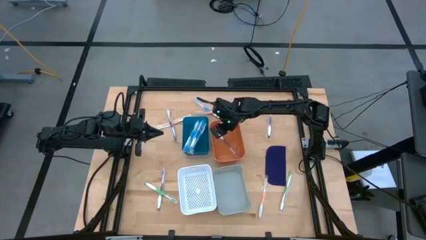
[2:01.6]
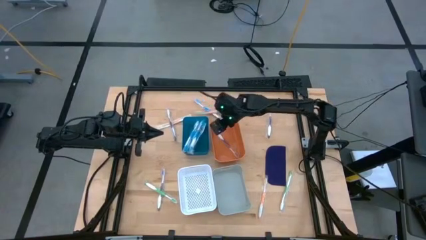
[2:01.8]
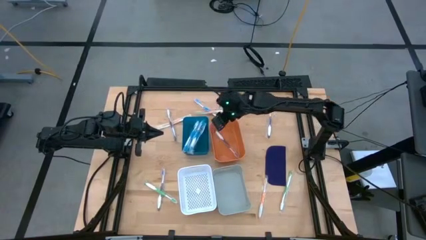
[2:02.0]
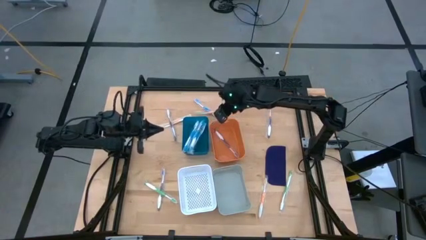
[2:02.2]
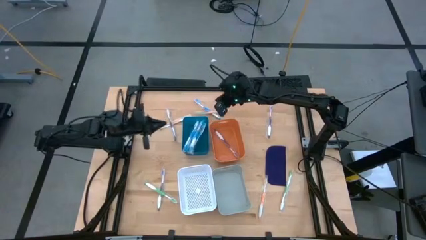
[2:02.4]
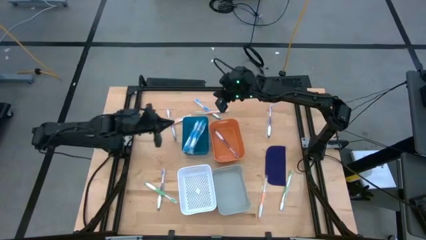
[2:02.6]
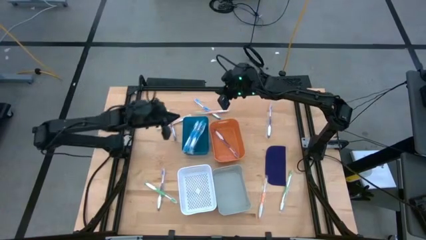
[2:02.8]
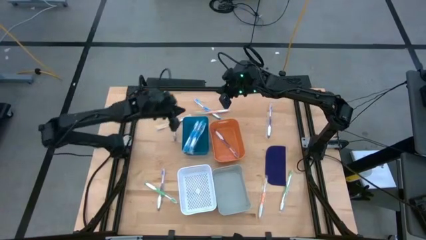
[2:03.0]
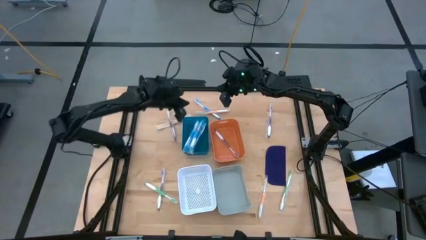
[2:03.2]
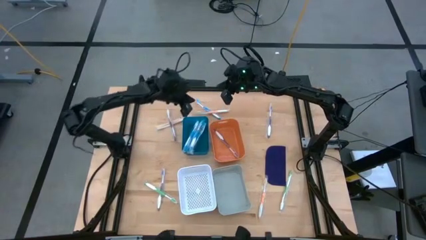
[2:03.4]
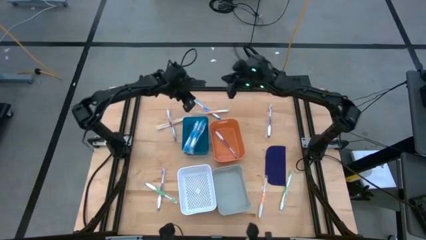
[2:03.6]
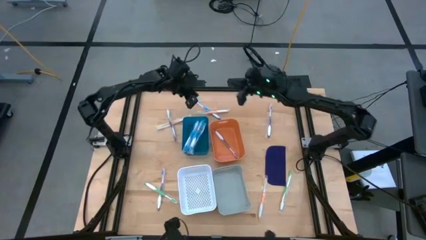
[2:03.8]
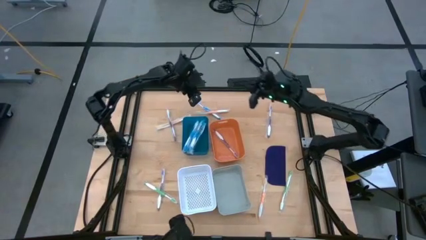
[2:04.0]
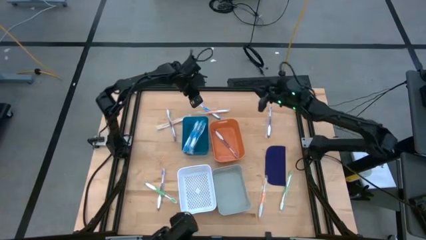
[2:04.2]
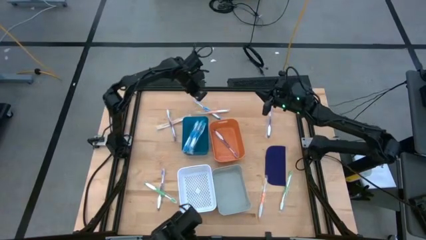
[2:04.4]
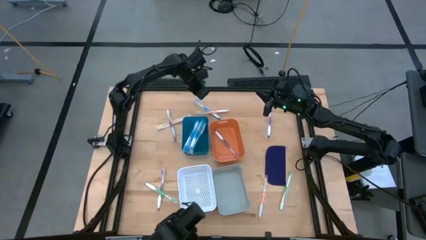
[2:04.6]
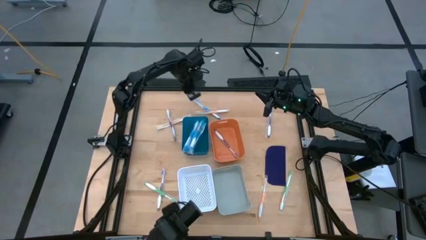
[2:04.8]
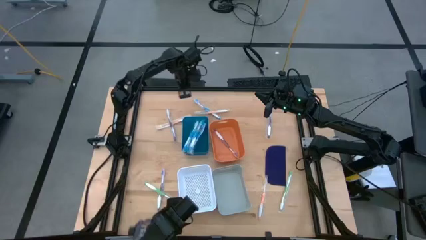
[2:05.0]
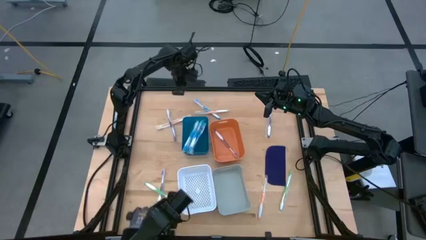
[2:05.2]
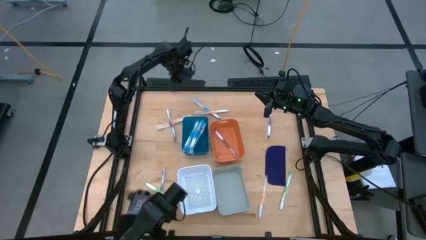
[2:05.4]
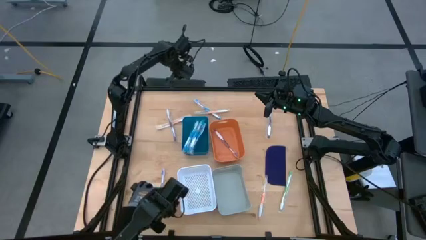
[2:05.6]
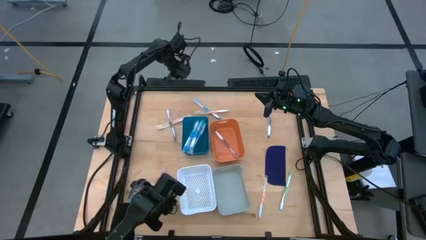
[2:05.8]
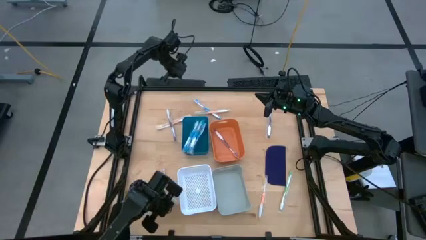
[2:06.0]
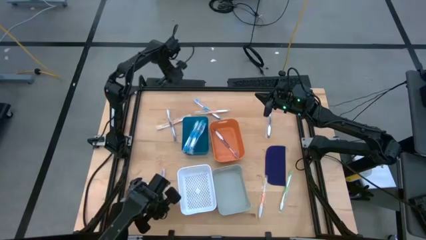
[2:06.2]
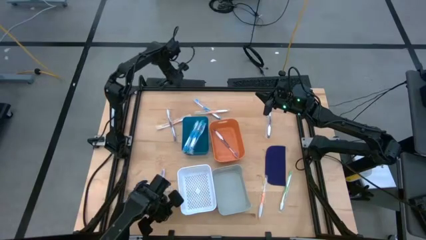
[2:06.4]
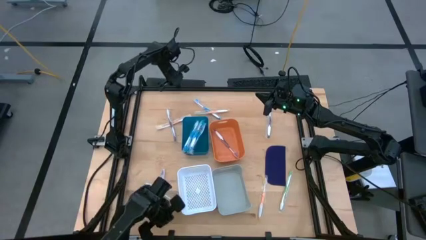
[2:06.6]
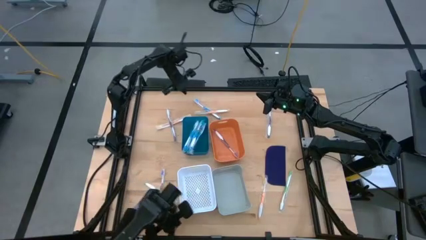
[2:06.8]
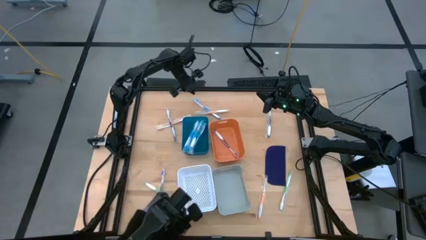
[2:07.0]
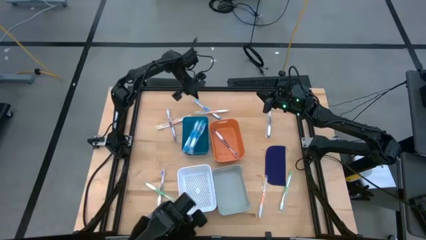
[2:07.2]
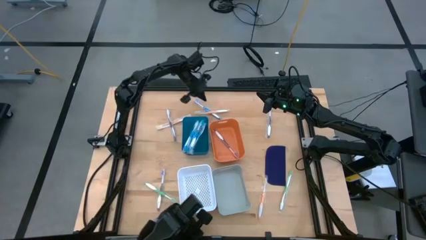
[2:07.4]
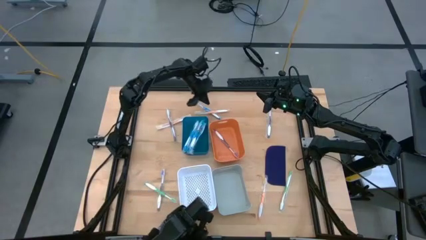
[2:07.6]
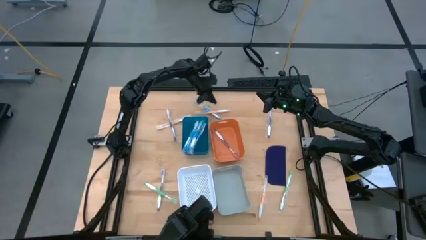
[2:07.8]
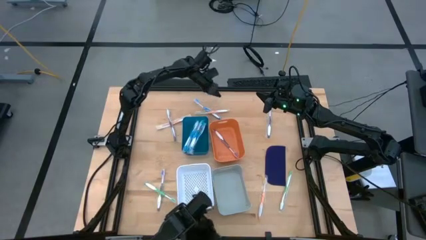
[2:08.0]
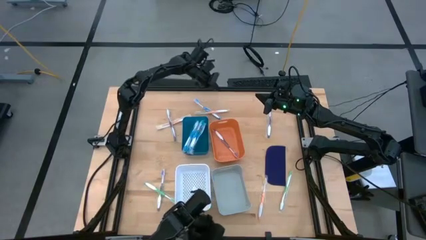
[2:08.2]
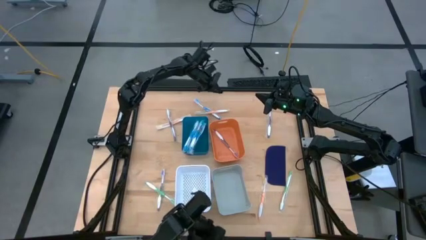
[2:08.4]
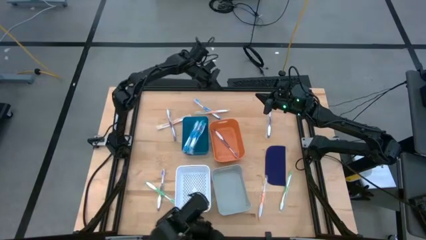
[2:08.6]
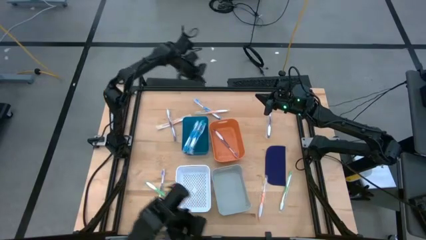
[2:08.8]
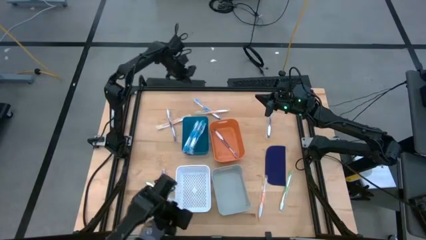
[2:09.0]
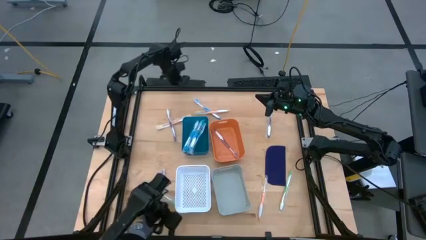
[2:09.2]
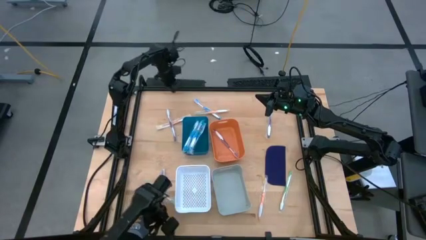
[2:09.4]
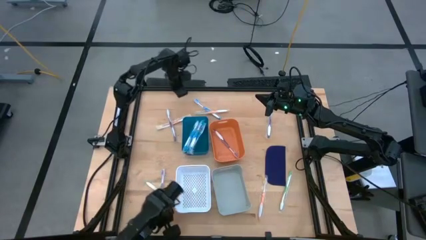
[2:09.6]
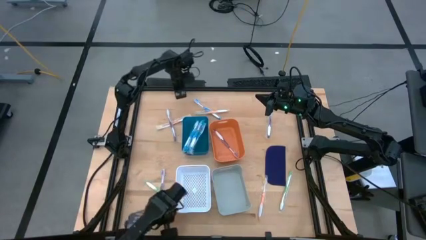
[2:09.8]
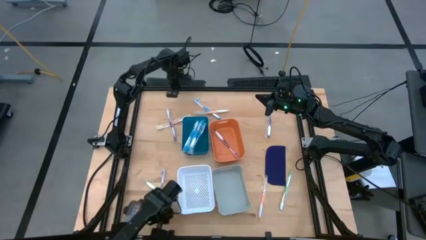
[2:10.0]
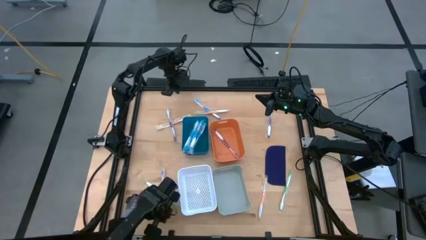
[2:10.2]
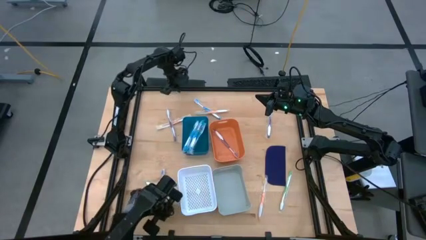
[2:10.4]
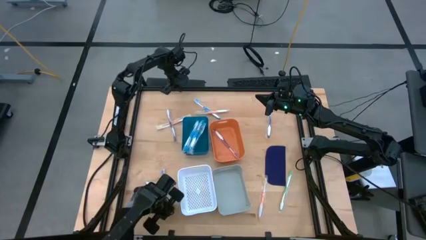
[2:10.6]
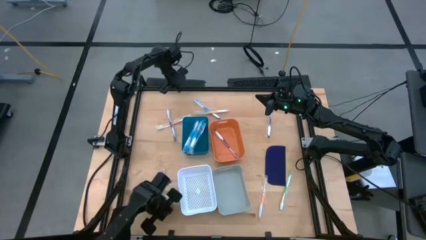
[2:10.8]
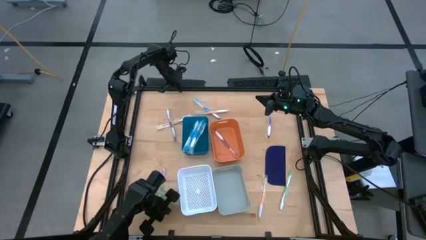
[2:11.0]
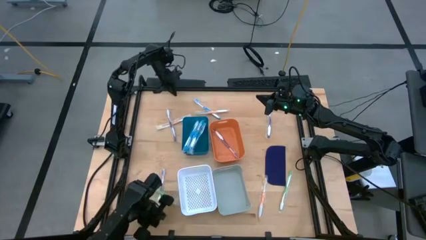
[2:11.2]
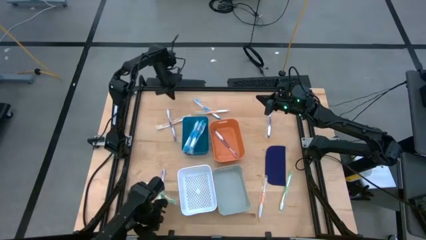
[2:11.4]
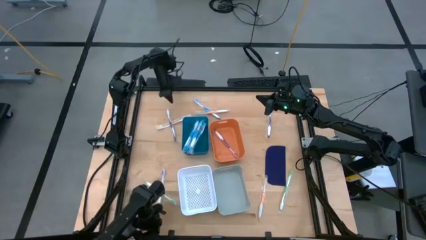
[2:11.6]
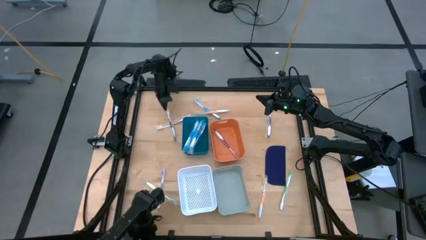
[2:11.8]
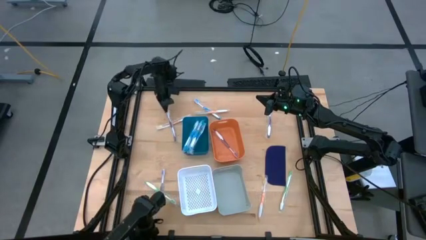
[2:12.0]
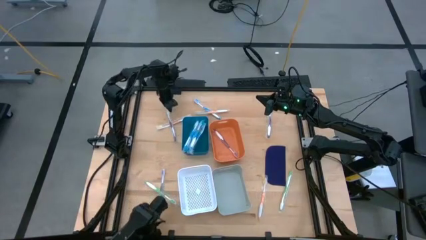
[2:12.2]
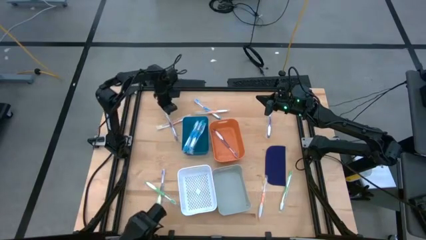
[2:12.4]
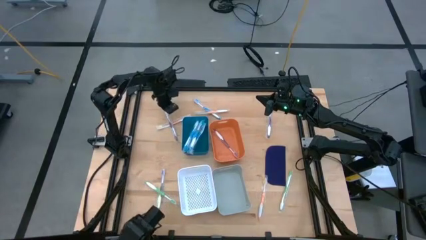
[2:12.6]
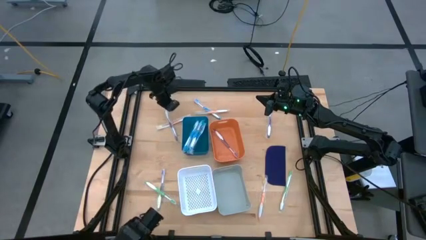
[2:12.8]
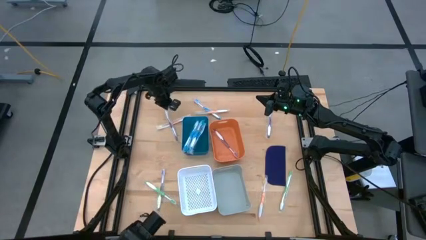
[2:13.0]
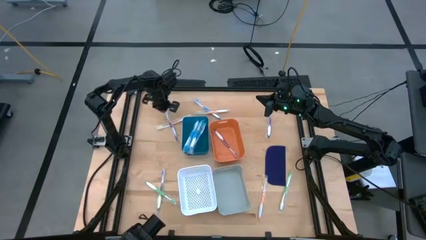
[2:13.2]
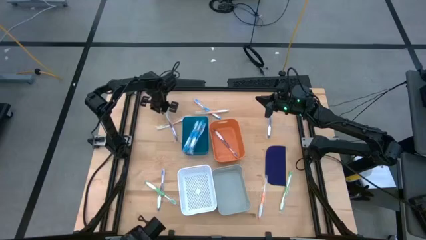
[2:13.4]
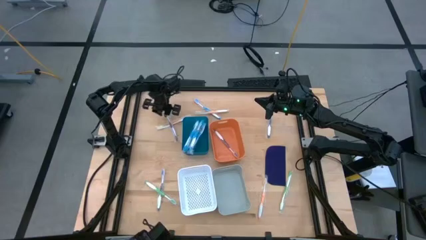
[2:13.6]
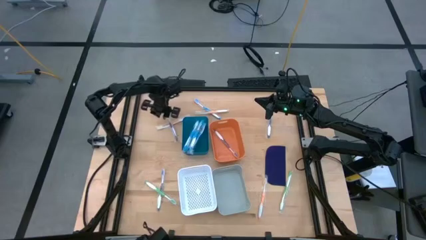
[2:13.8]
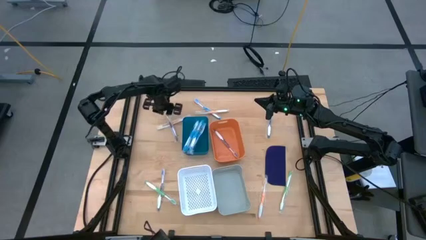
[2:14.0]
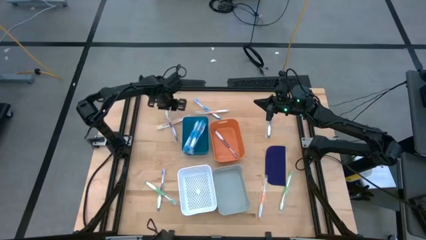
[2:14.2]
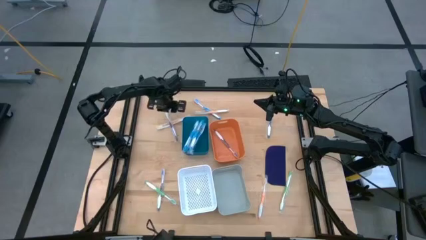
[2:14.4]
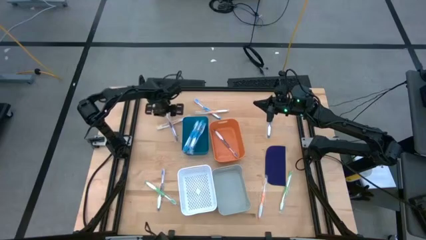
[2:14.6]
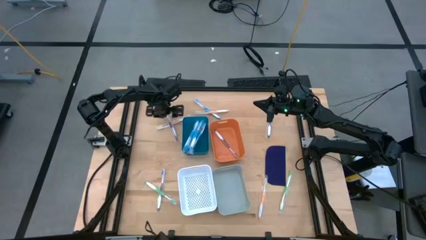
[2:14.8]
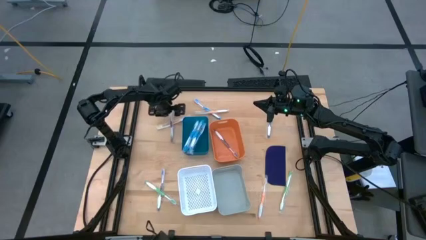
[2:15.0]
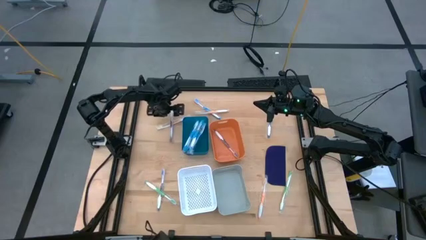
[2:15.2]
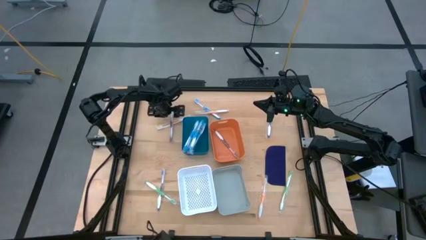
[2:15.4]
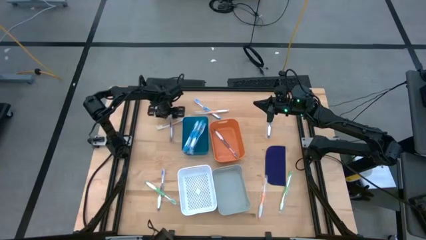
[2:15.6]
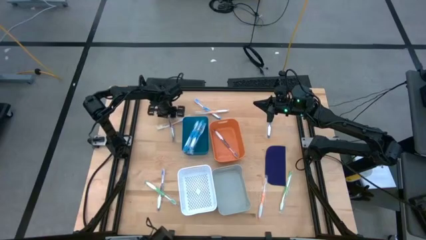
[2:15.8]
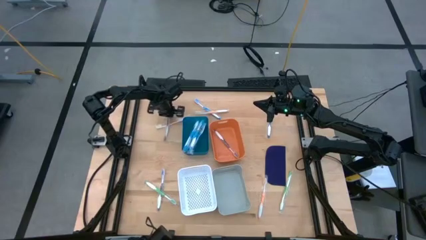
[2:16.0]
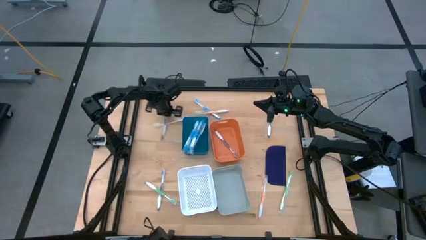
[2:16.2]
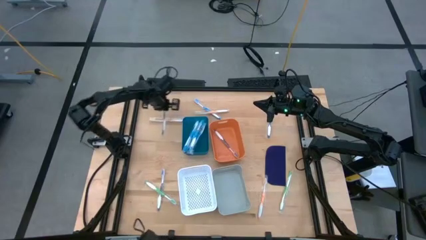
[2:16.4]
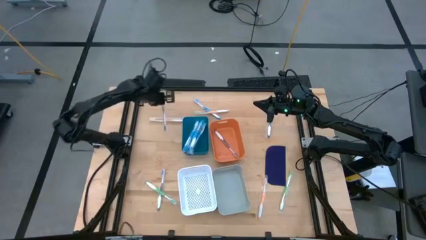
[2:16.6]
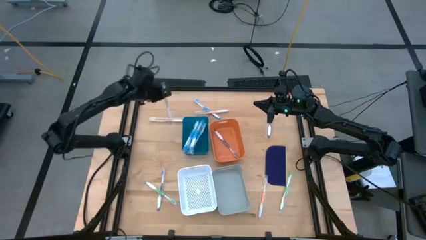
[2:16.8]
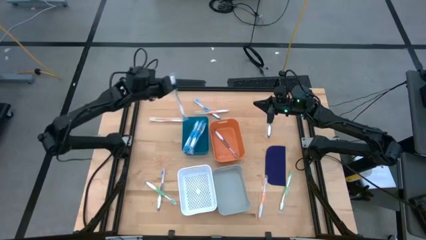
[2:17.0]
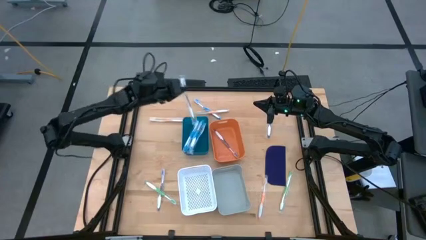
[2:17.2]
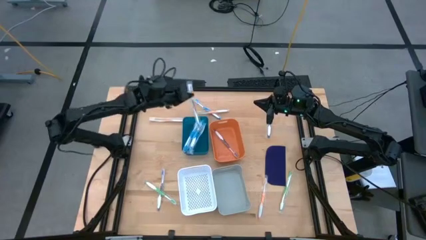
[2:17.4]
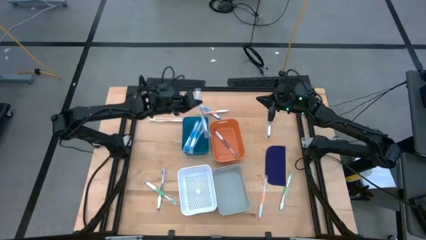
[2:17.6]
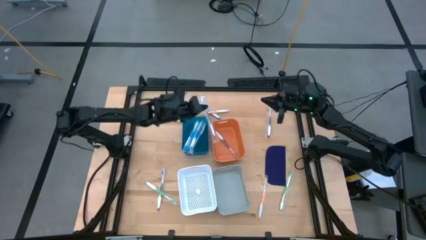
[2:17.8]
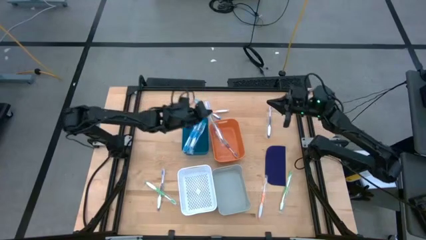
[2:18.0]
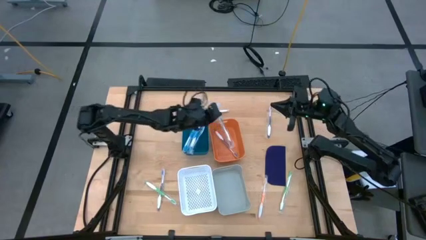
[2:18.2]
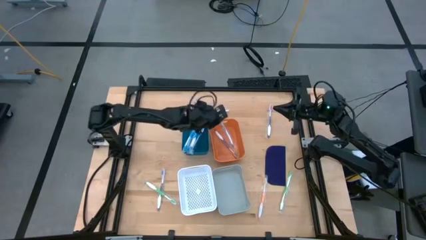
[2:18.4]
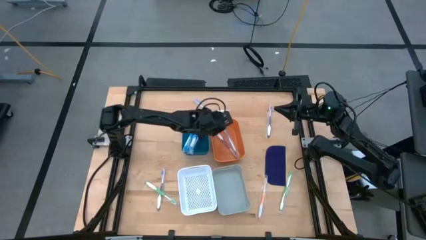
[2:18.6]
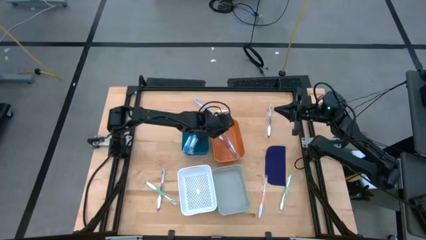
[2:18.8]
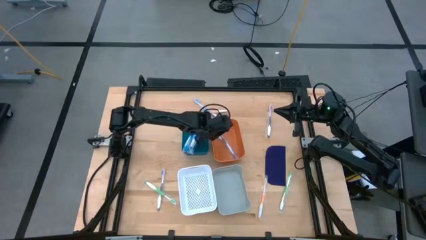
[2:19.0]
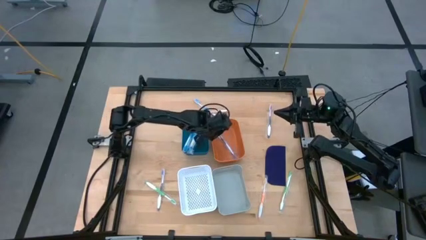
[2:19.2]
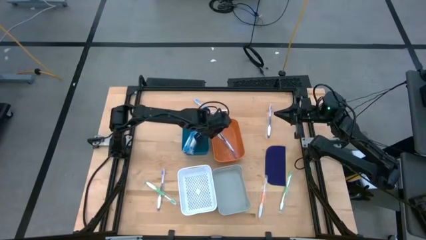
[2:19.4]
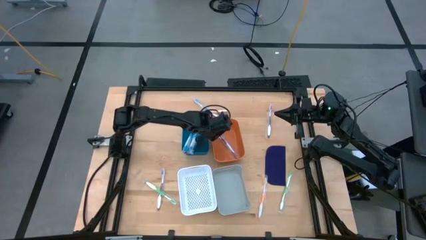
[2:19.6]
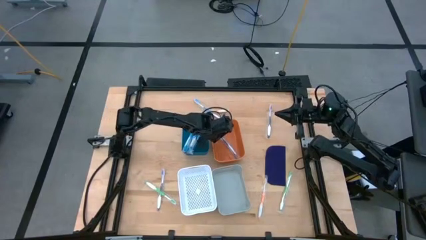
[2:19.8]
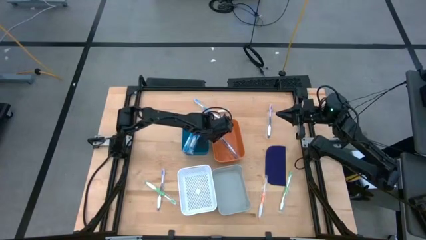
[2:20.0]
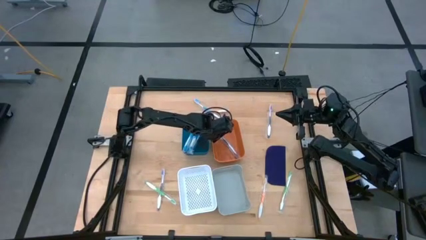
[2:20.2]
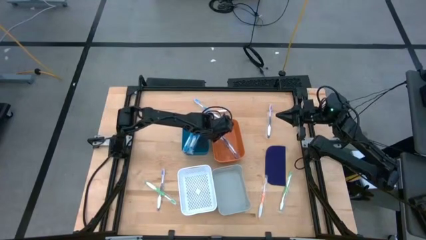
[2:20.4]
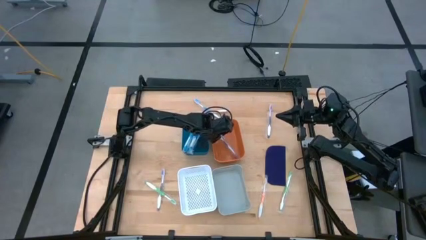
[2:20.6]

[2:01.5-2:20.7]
Task: Pick & Place Toothbrushes
Put the violet toothbrush into the orange bin
